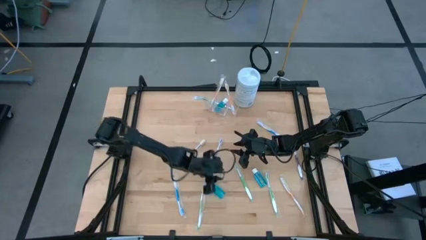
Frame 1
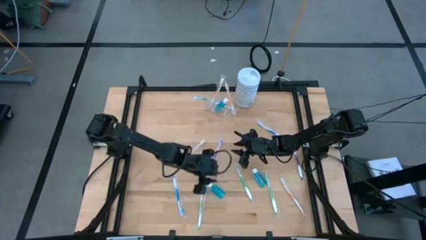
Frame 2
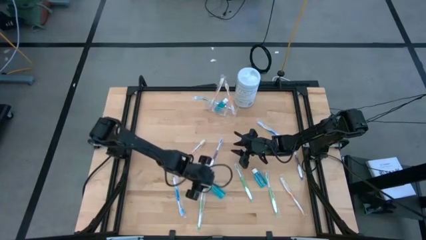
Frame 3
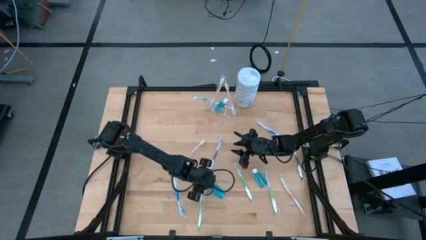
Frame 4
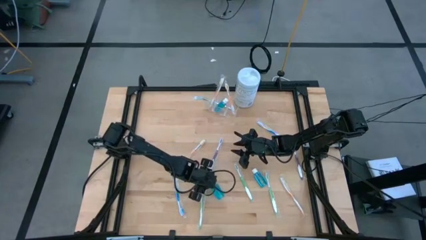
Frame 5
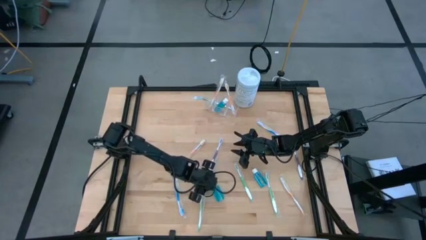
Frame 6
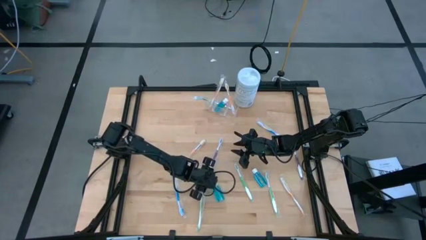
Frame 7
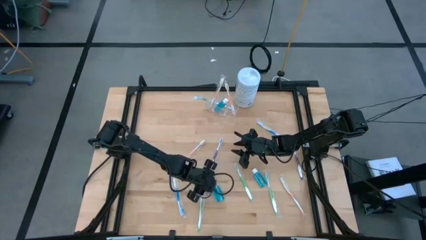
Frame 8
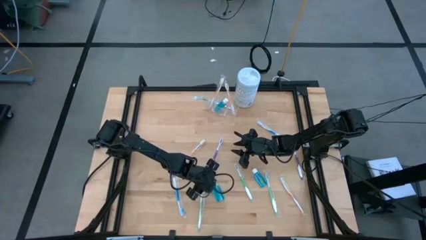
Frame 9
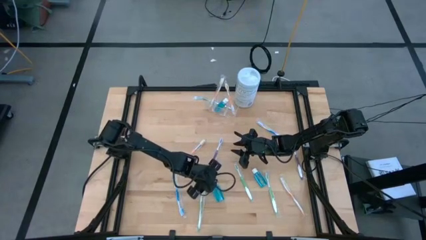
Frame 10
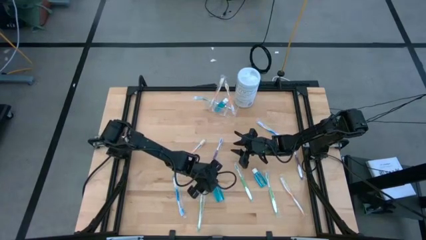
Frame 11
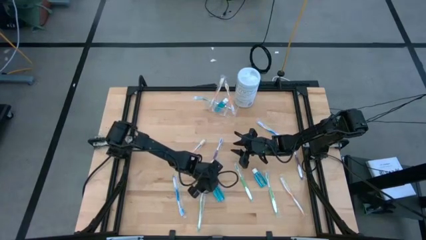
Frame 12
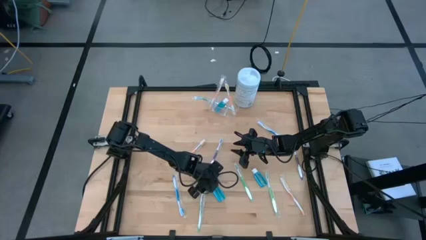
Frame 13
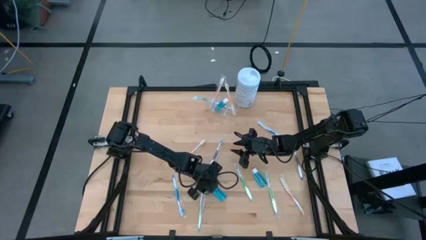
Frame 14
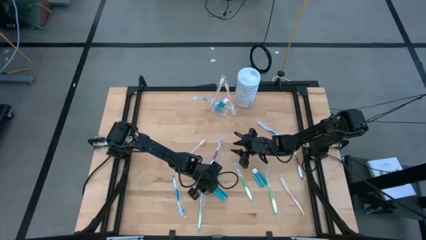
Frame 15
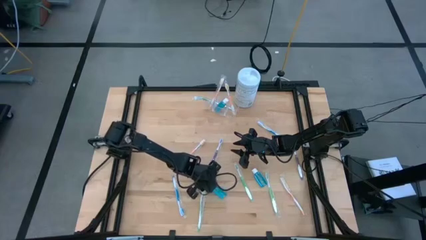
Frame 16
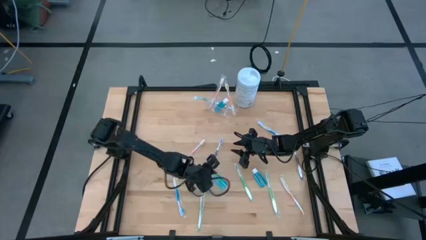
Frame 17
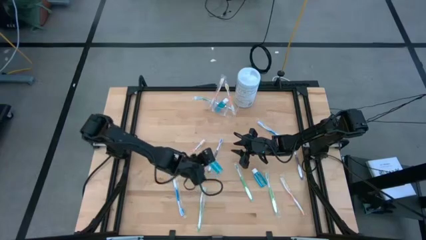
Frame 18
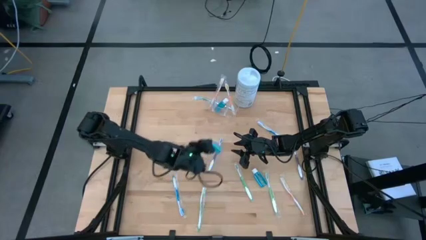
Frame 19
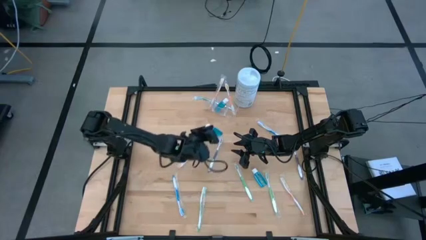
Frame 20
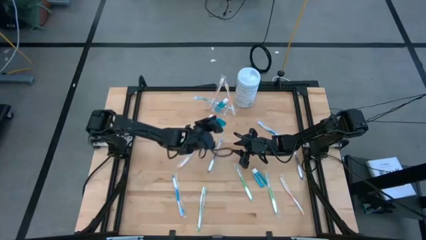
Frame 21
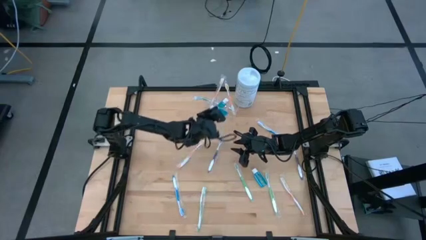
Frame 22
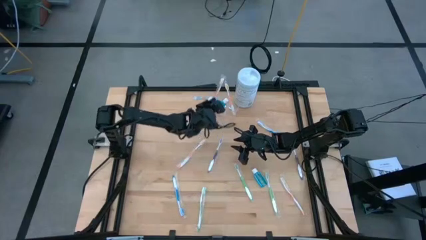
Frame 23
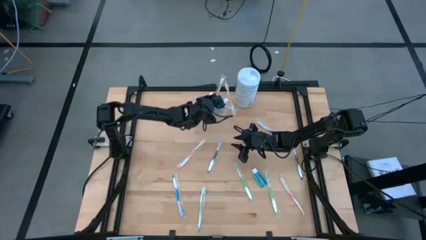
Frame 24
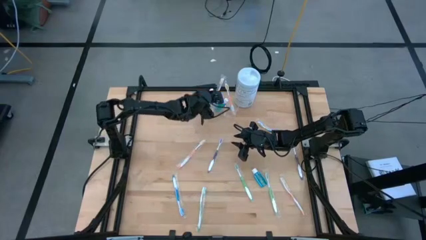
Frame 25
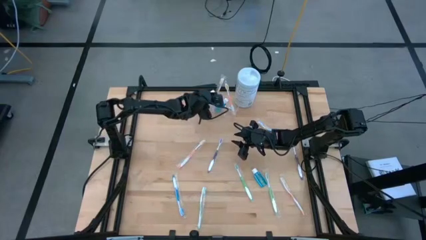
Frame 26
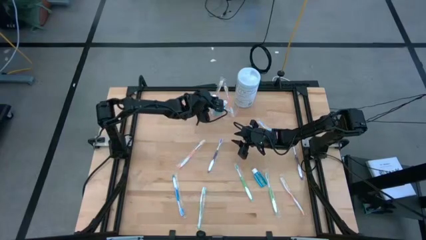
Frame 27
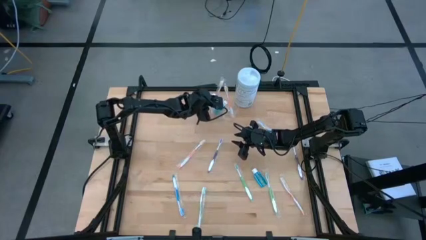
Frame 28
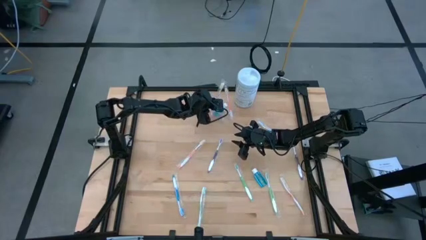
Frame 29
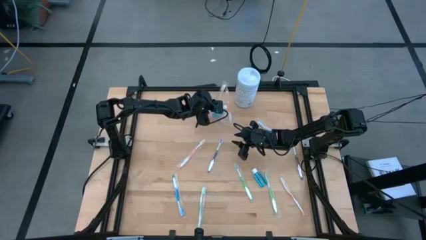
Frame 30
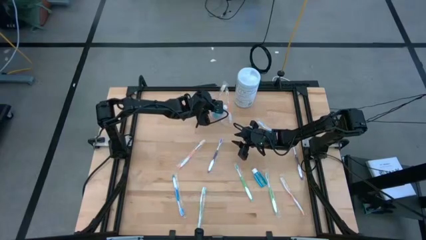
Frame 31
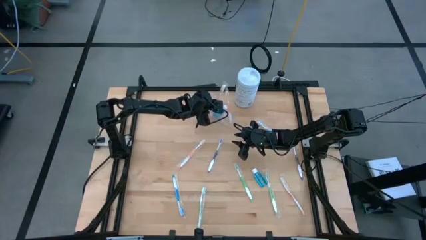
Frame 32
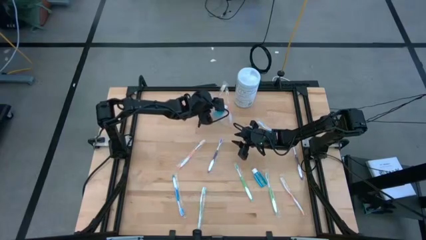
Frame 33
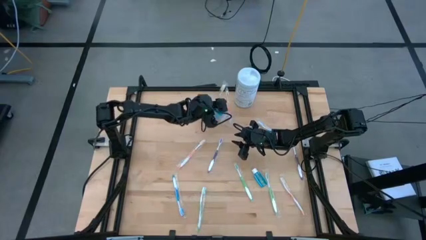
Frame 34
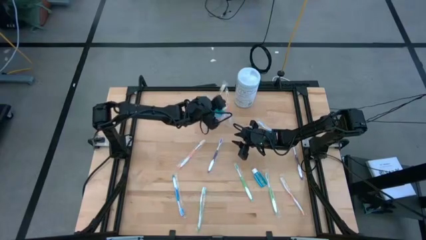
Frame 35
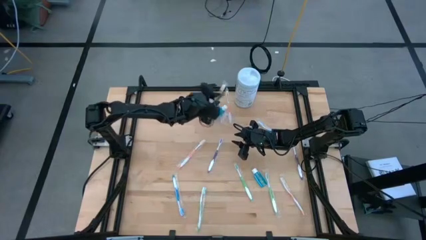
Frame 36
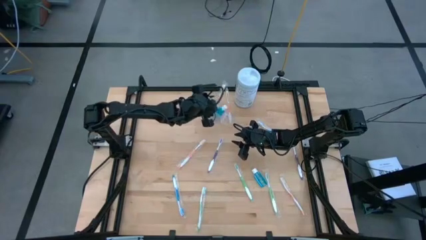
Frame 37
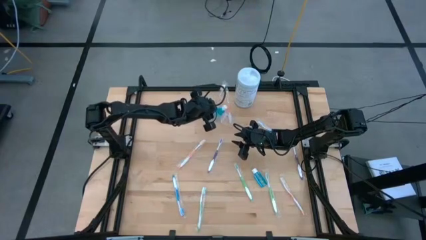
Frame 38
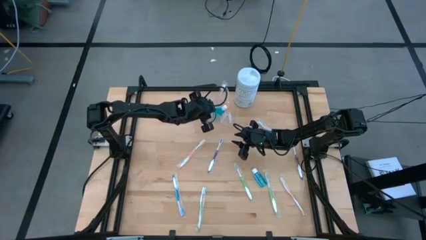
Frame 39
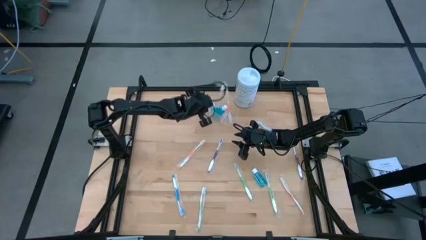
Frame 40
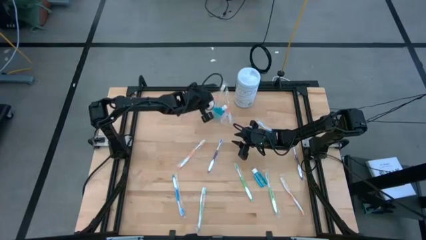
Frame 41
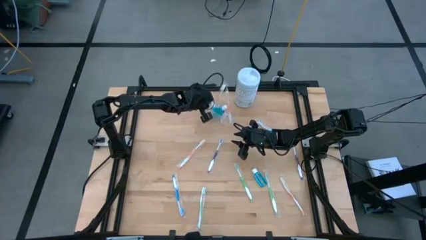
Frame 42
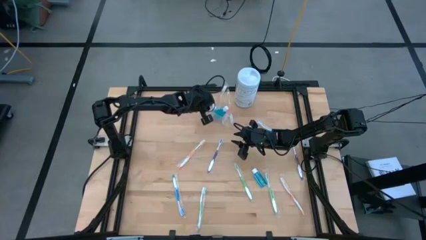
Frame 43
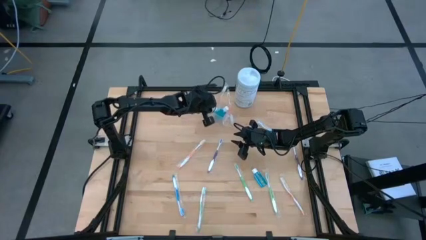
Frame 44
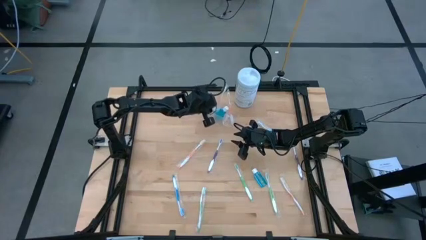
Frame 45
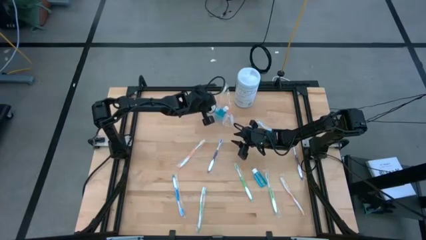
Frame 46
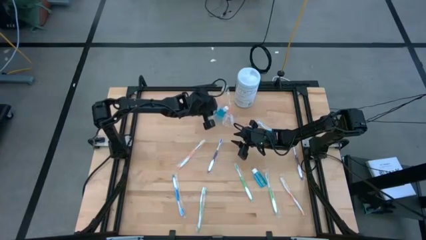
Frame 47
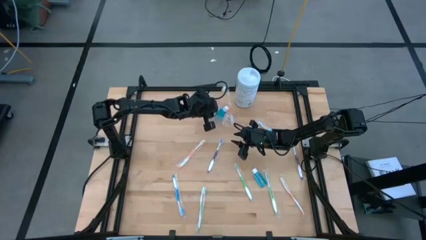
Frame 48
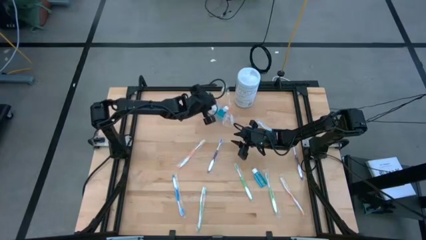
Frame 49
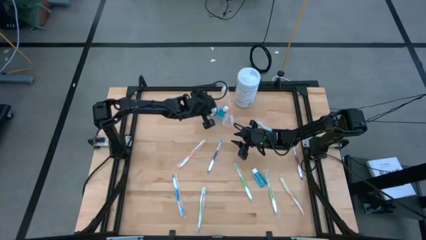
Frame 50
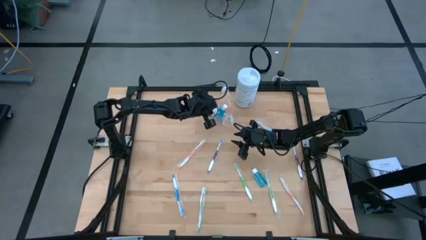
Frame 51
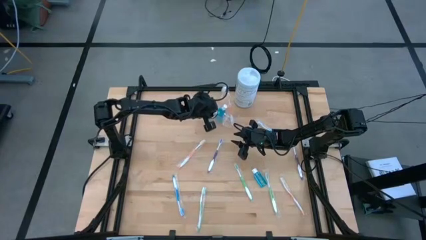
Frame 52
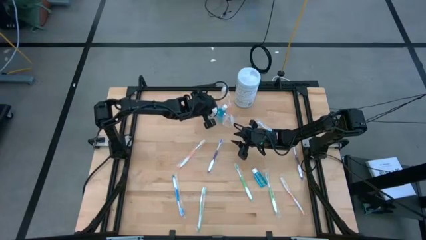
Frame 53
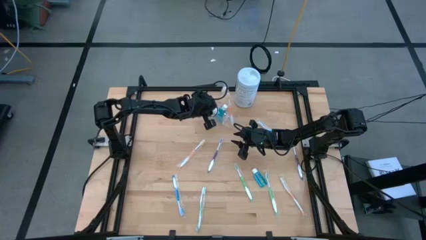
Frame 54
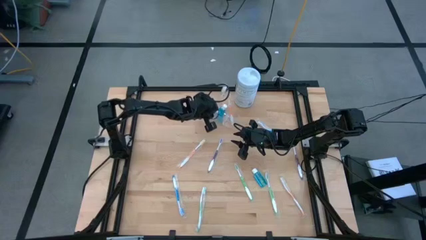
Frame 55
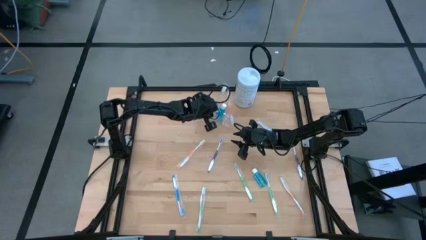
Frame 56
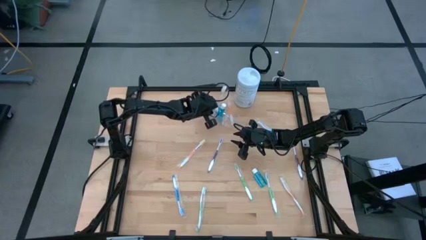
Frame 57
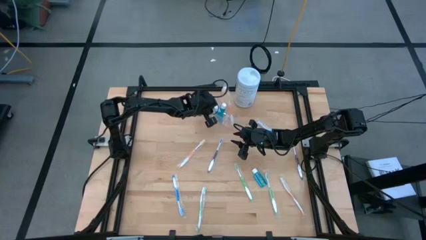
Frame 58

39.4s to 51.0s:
Task: Pick & Place toothbrushing station
Put the blue mouthwash into the transparent organizer

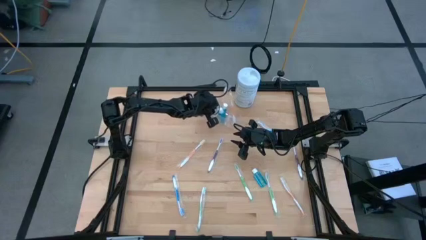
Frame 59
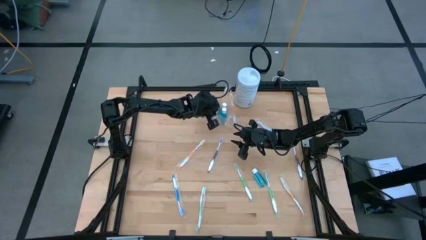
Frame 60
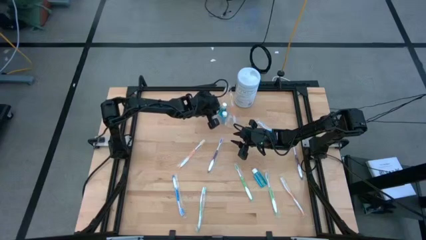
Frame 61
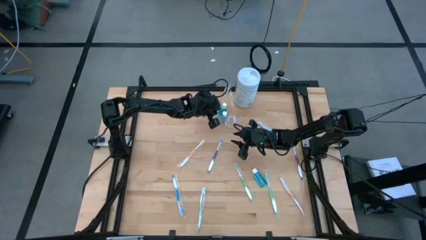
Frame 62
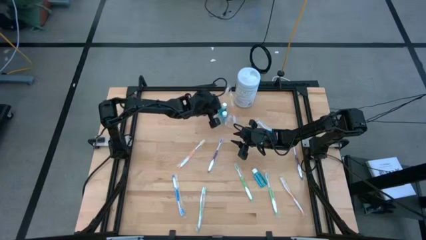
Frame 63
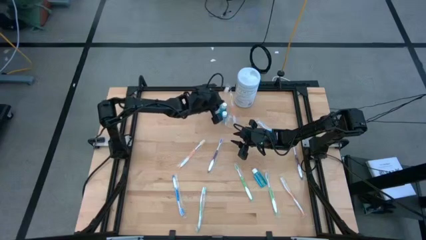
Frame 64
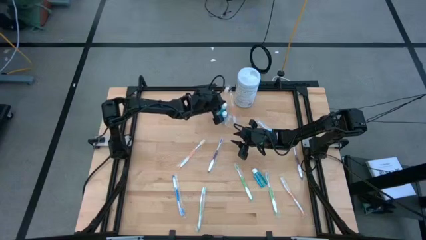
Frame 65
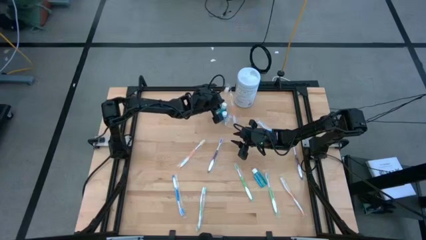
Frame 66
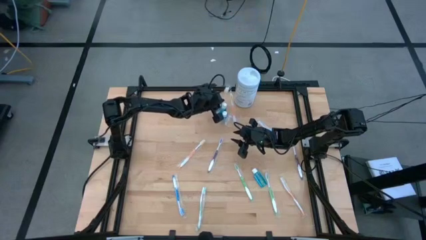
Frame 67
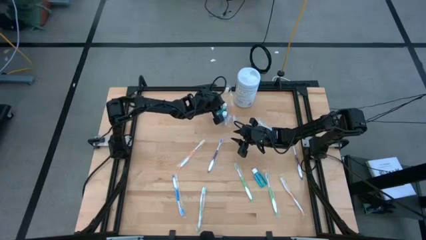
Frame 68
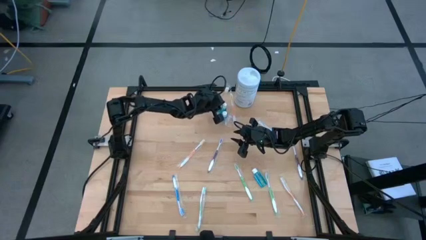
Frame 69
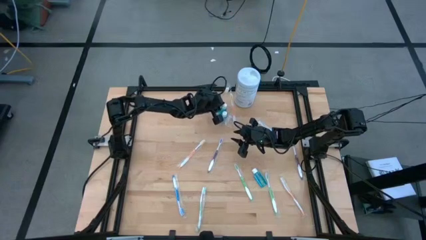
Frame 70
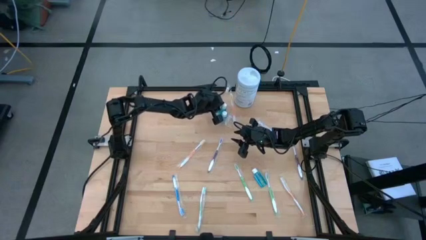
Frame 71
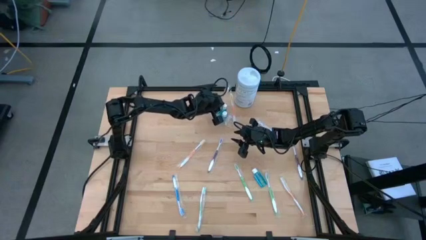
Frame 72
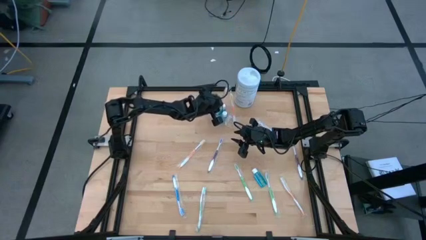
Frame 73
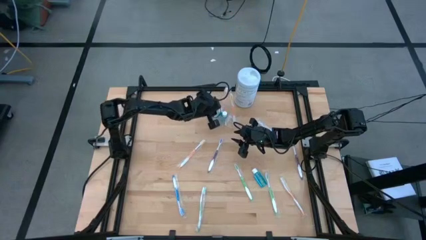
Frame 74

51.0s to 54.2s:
Adjust the blue mouthwash in the transparent organizer

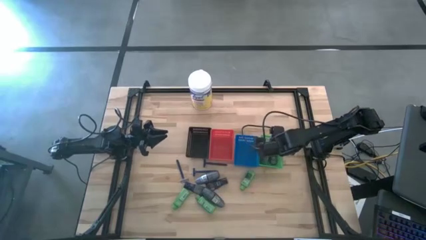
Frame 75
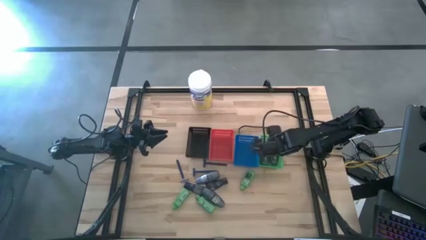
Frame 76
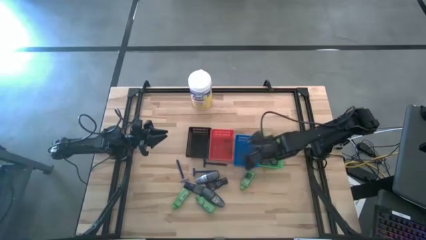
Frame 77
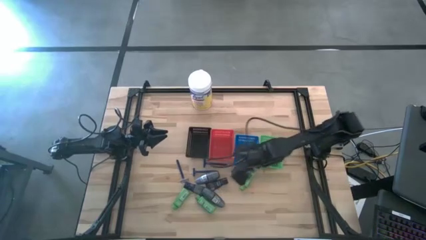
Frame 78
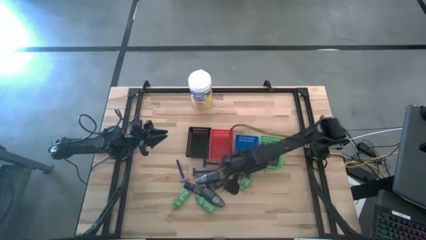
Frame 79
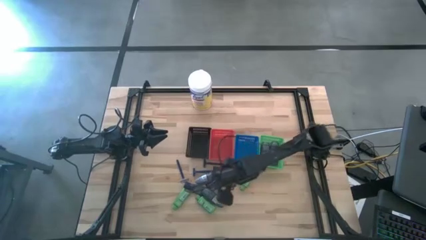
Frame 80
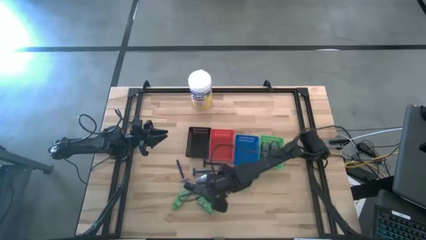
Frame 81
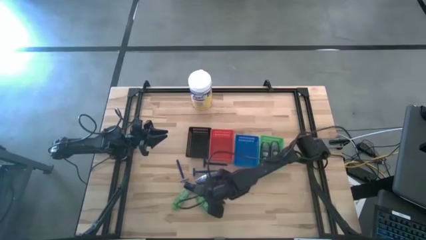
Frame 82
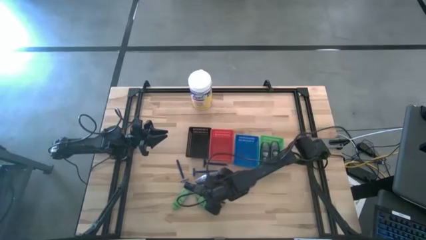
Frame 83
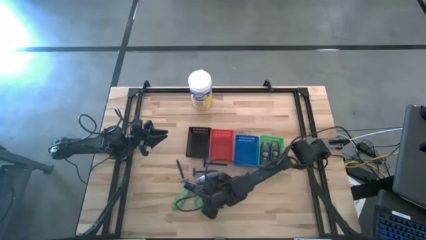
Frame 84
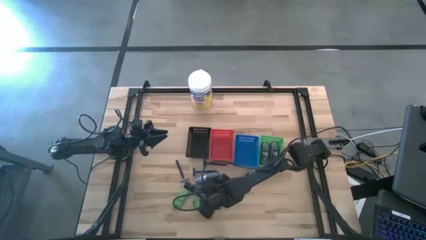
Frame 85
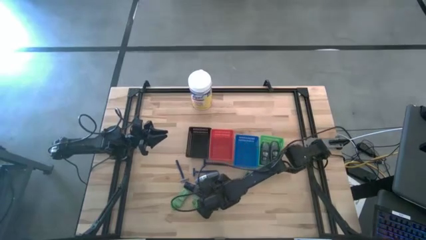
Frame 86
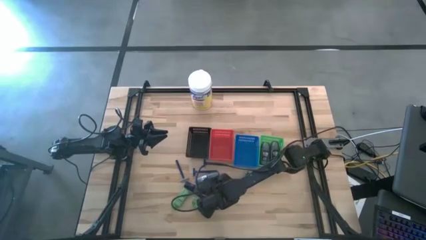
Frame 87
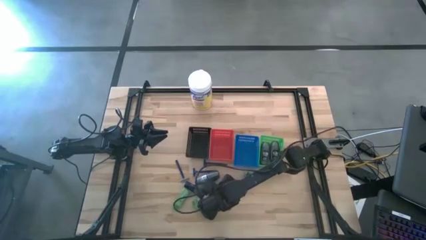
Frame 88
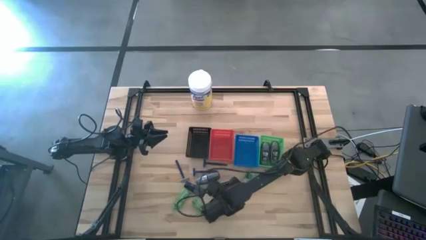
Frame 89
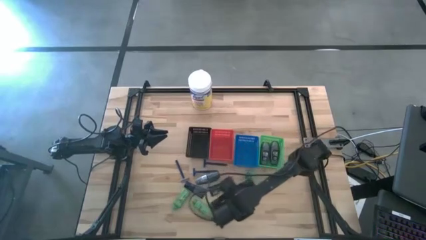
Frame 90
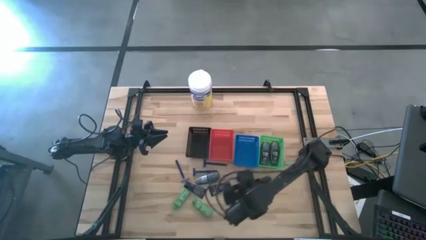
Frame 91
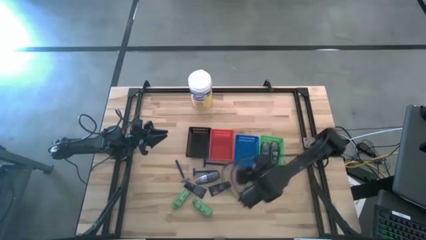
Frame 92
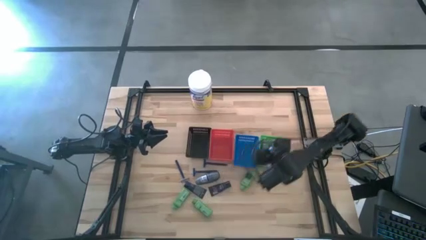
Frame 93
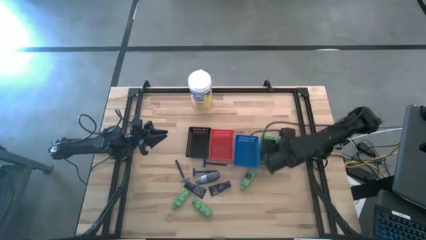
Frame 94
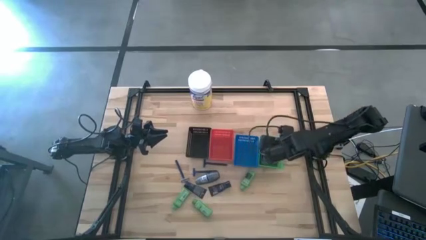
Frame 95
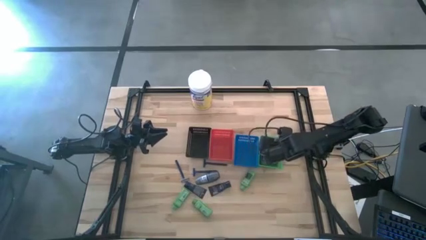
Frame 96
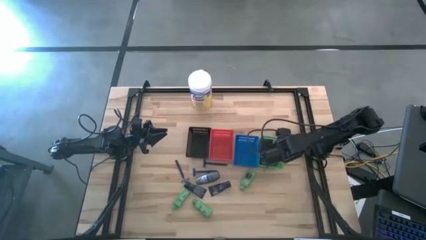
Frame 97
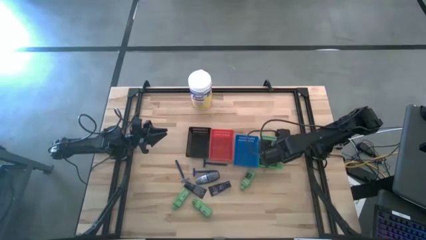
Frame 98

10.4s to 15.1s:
Task: Pick & Place Travel size toiletries
Put the gray deodorant into the green bin
